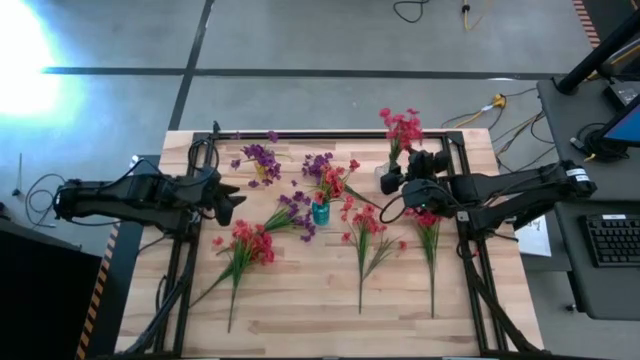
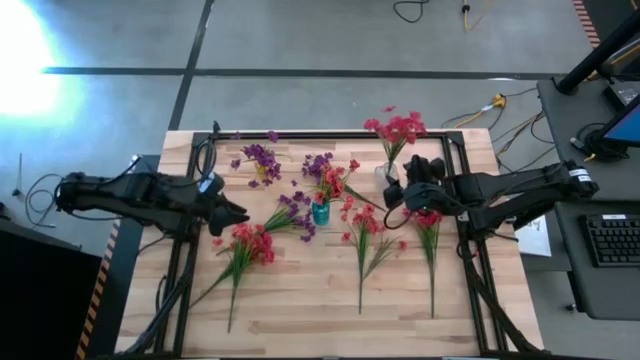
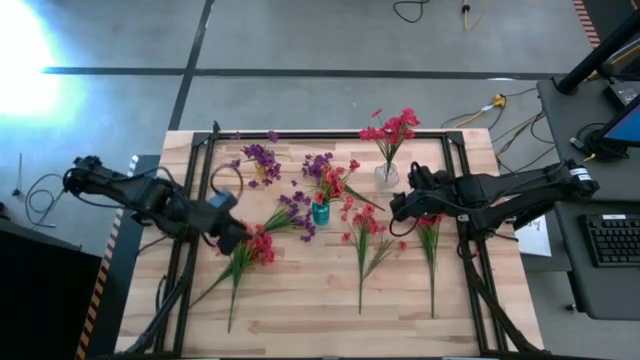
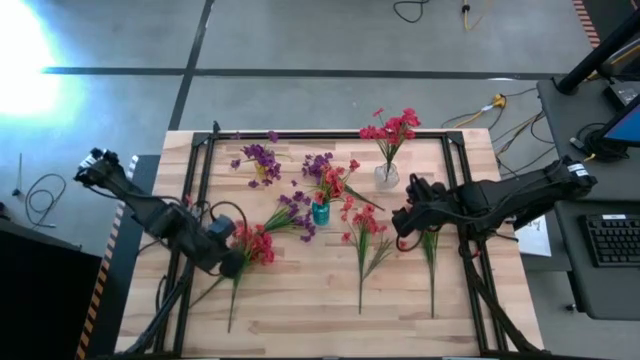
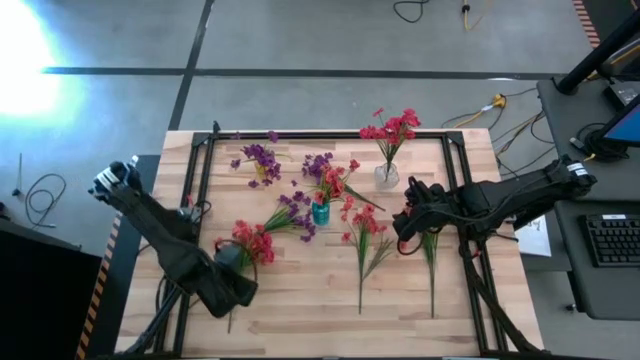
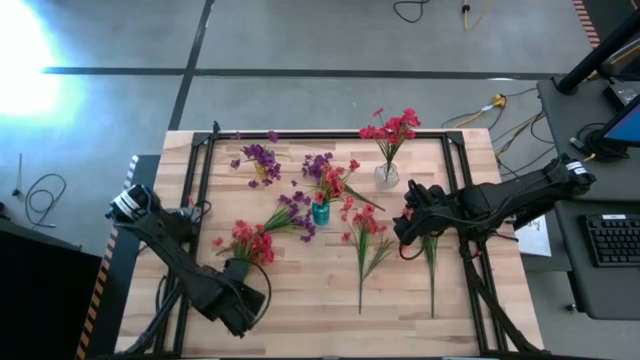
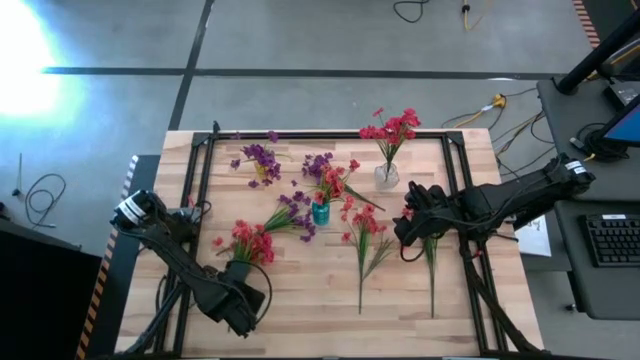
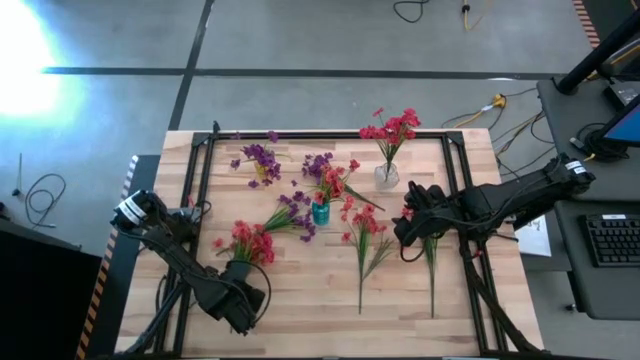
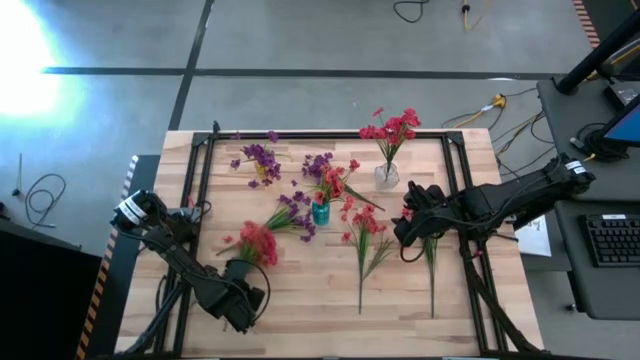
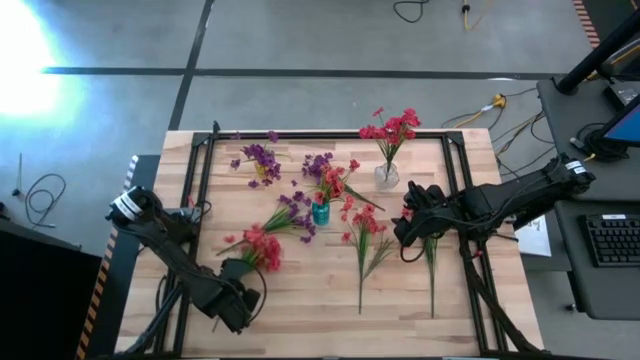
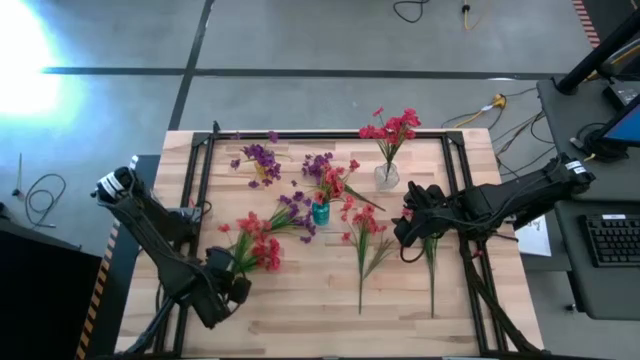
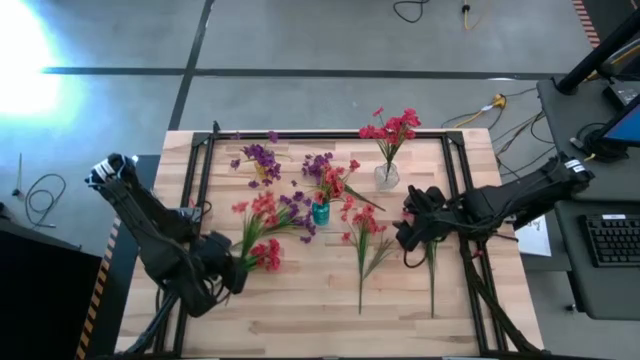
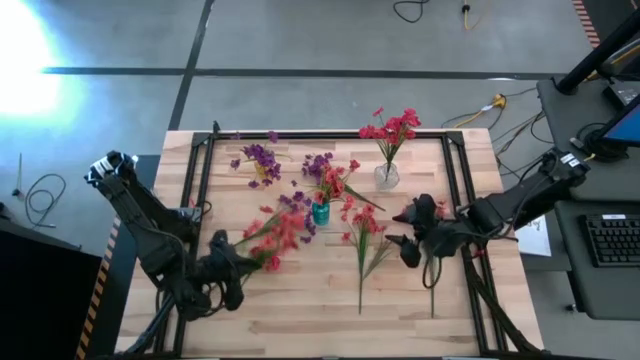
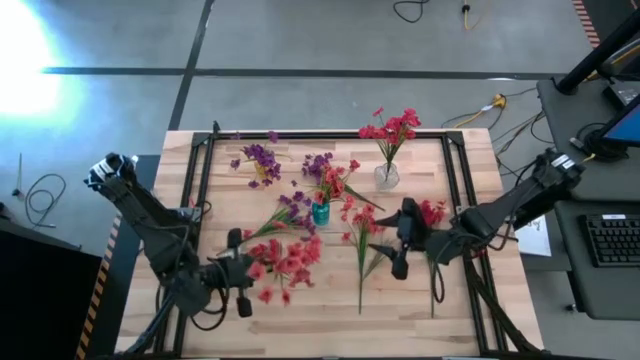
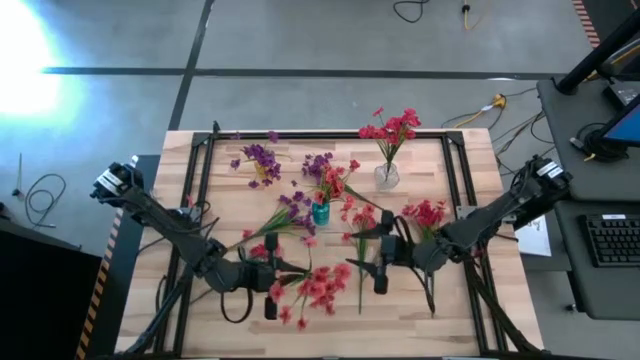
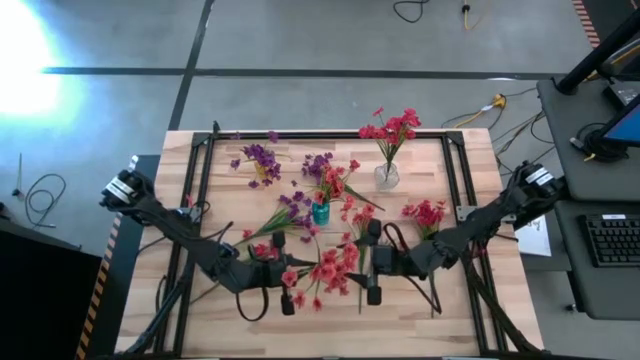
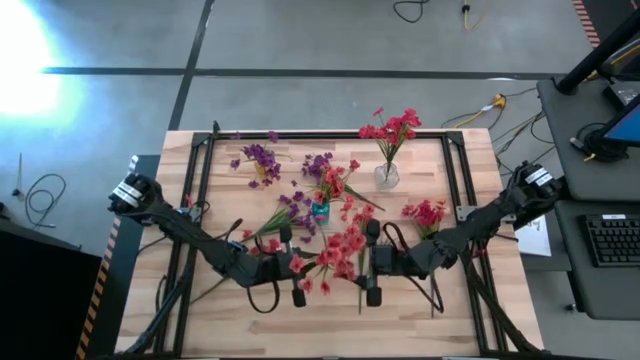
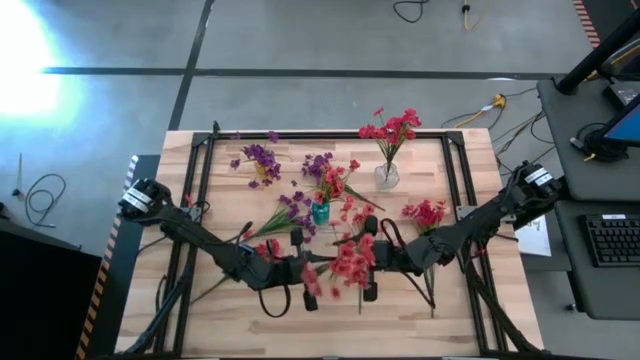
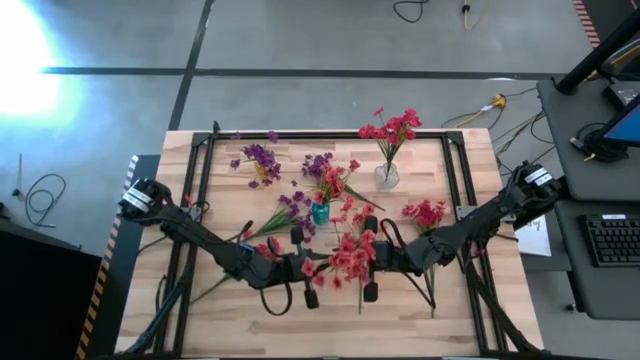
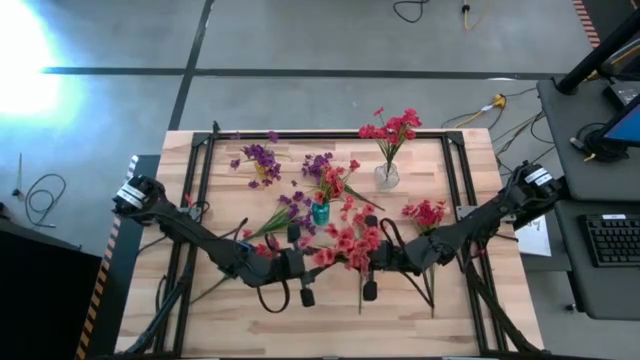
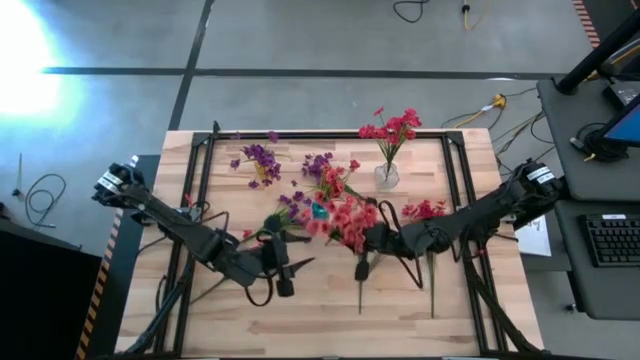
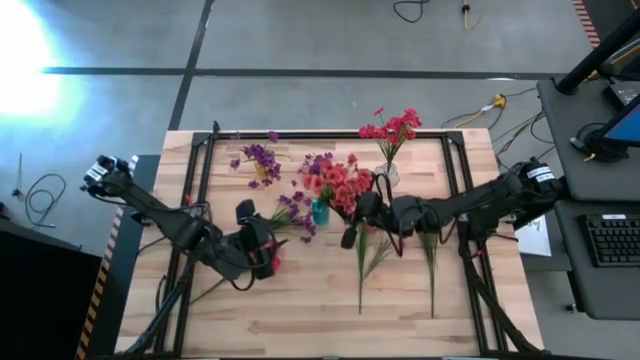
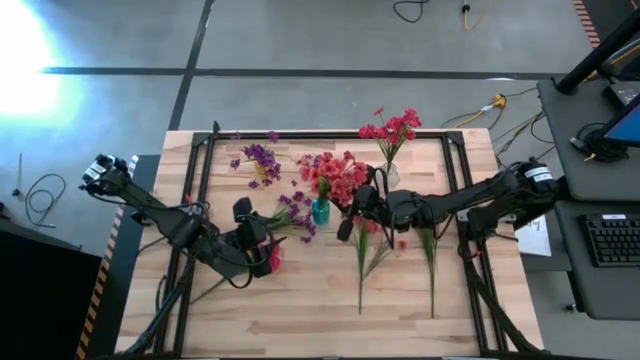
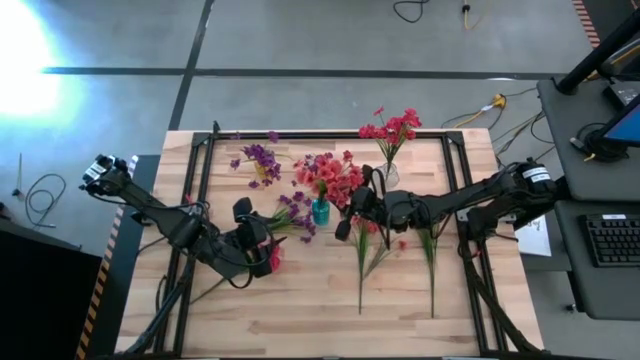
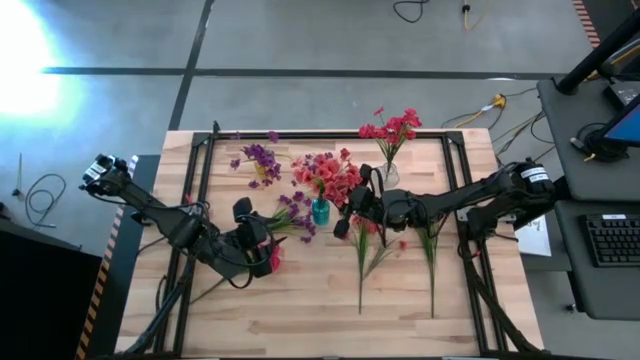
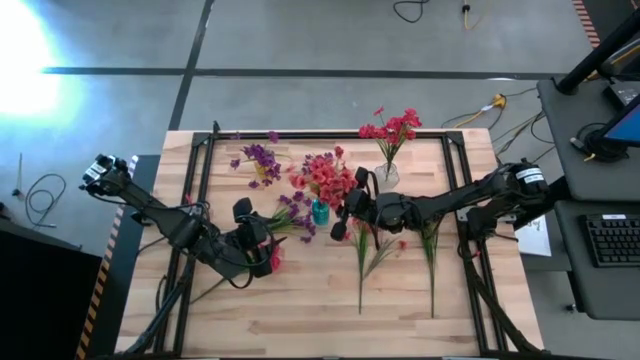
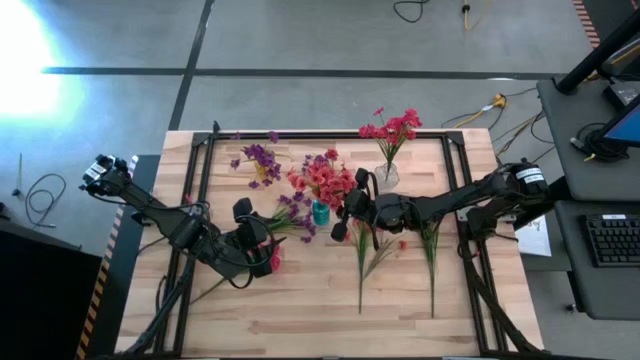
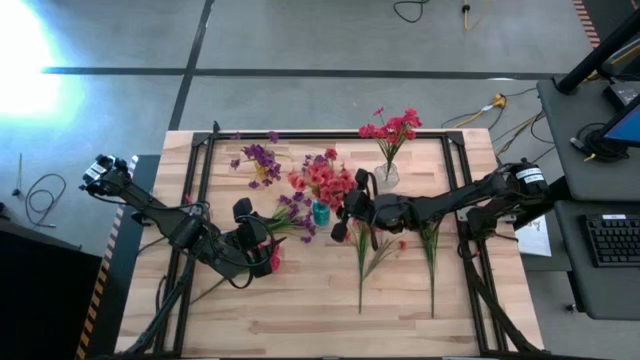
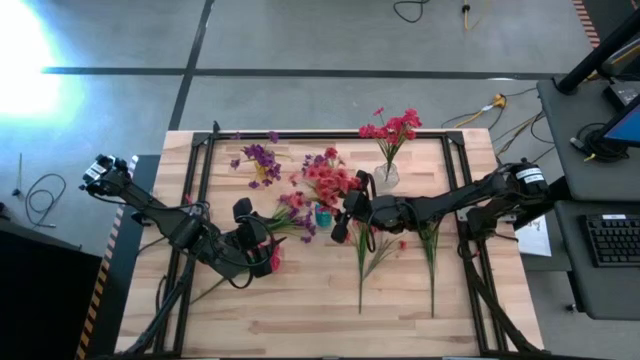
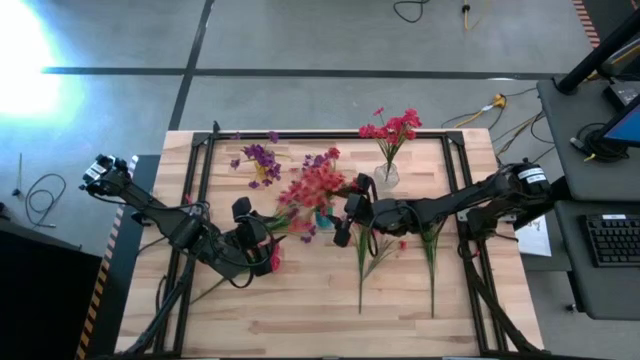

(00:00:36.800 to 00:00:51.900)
Task: Sort flowers into vase by color
Put the left orange flowers into the blue vase

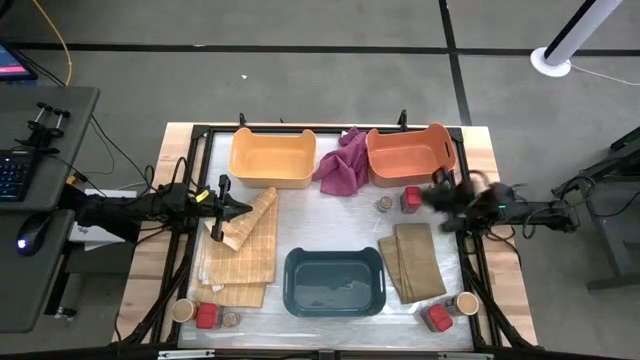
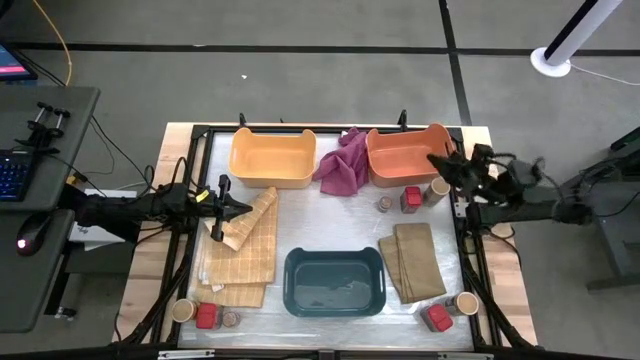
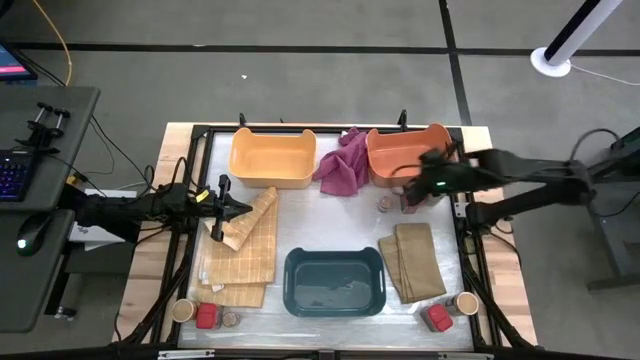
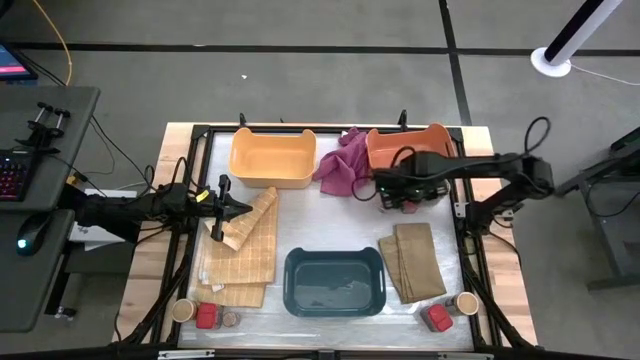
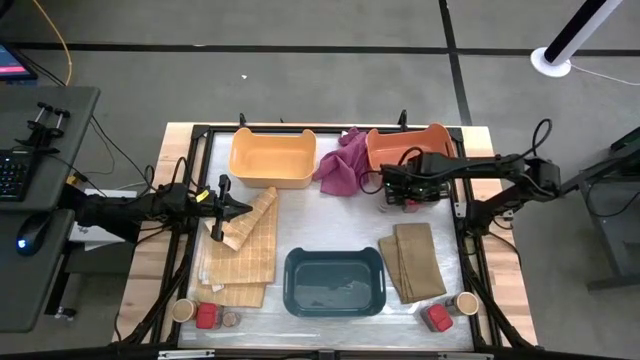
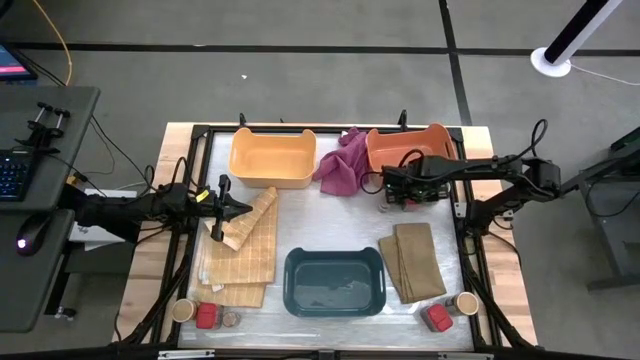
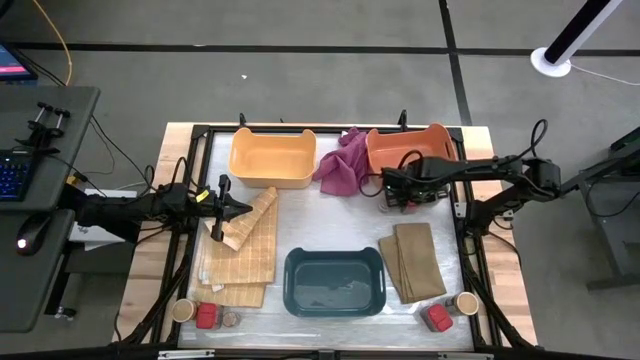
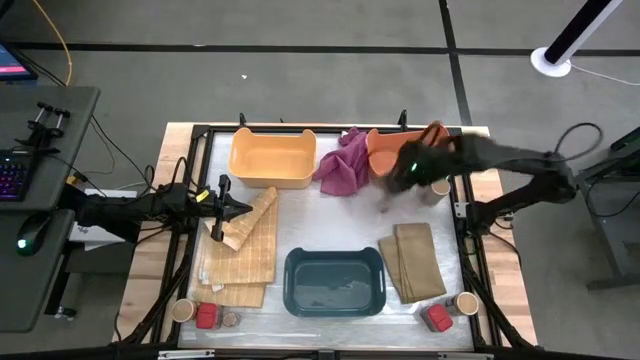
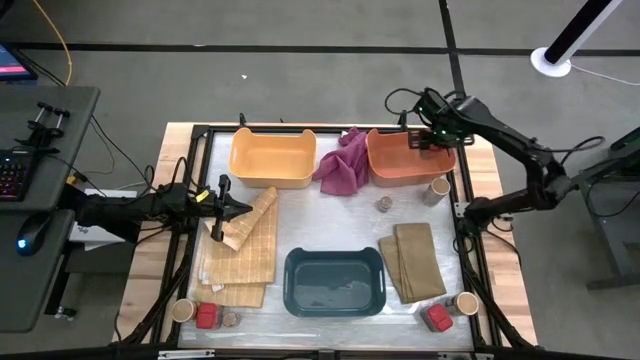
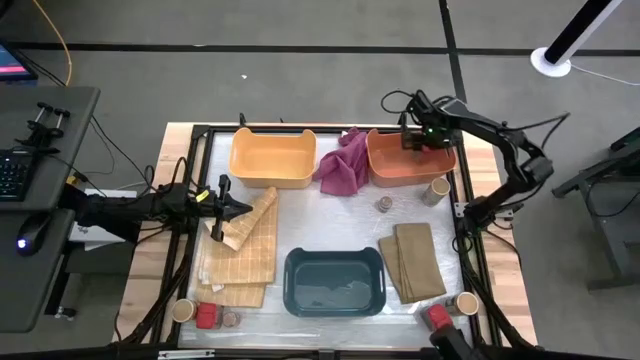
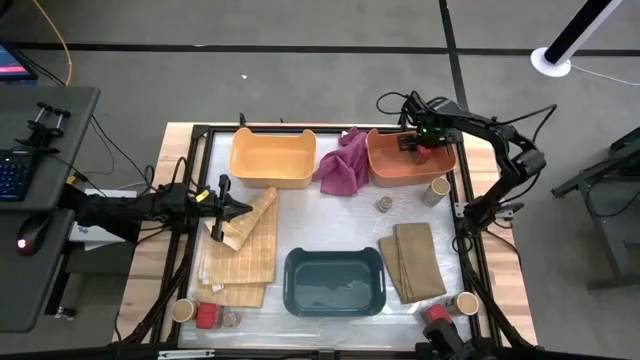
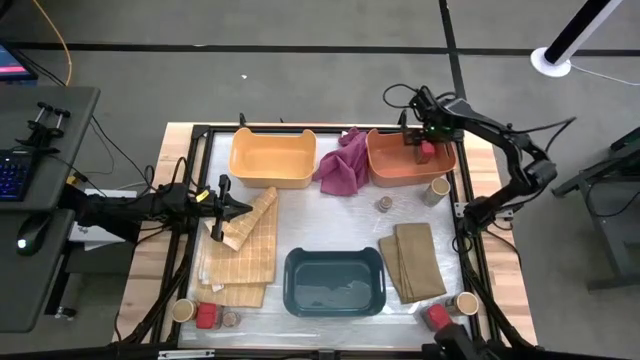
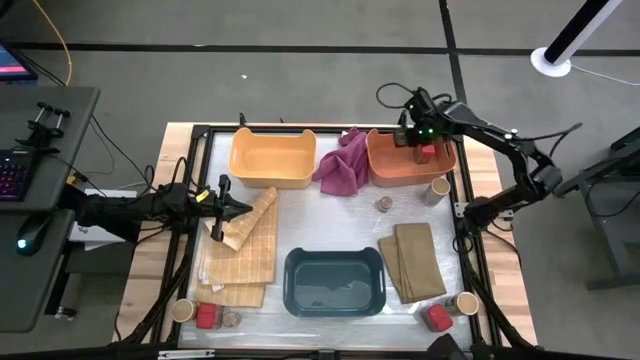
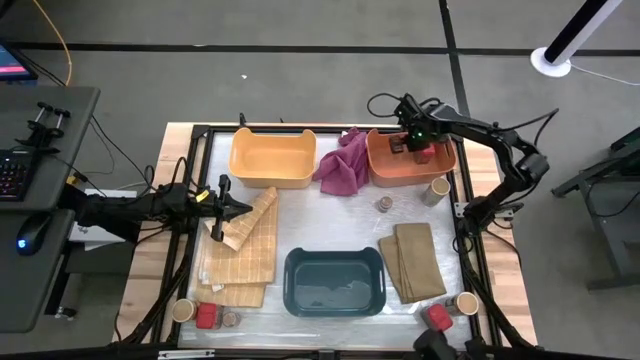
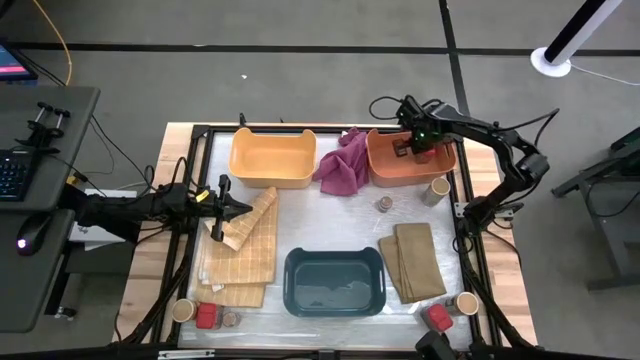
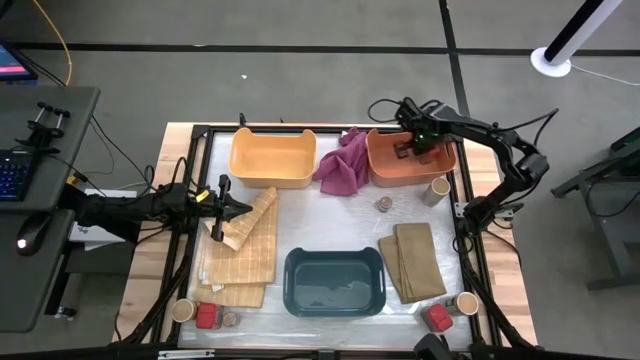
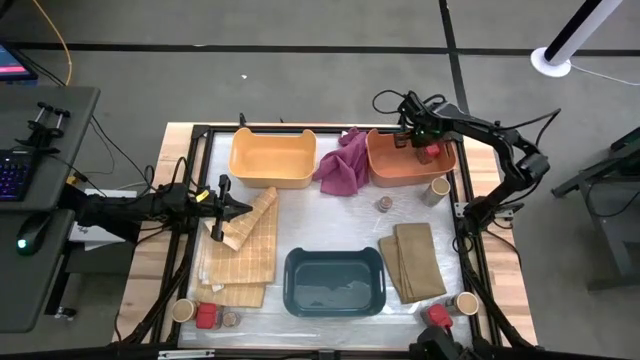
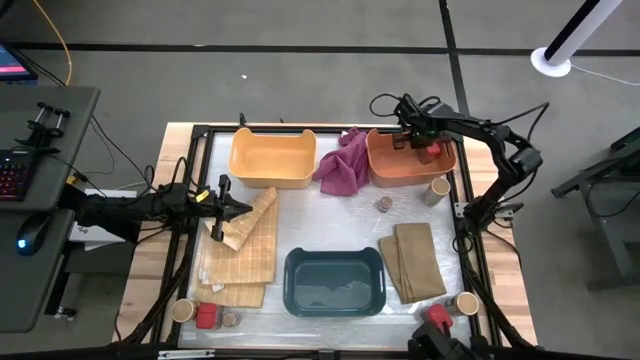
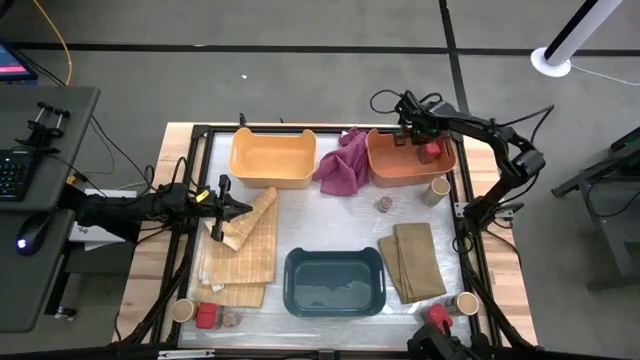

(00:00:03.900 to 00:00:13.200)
Task: Sort spices by type
Put the top right red seasoning can into the orange bin
